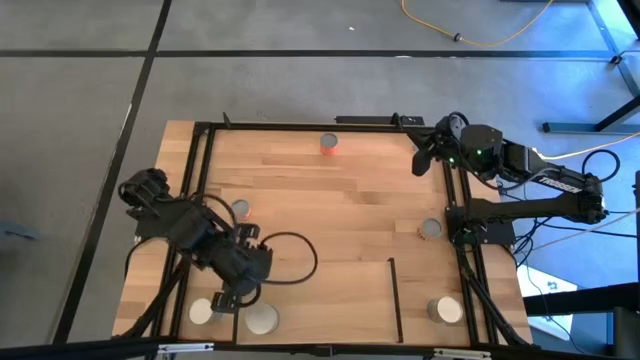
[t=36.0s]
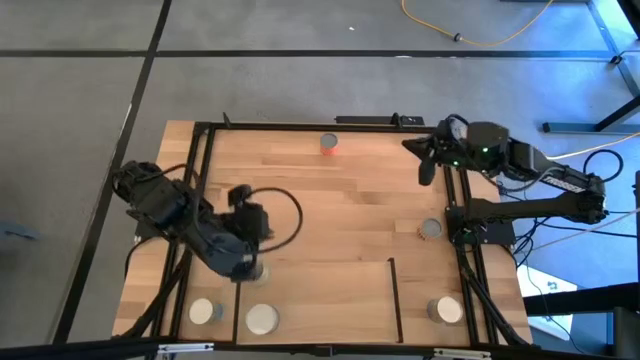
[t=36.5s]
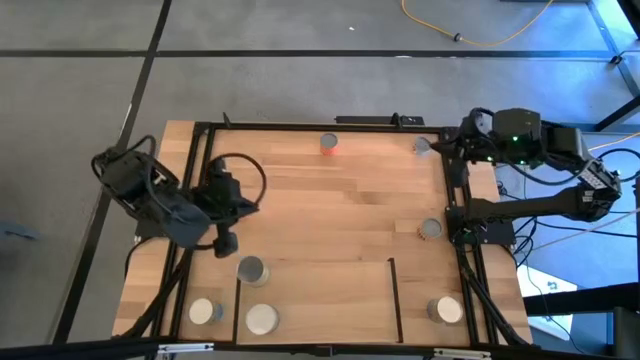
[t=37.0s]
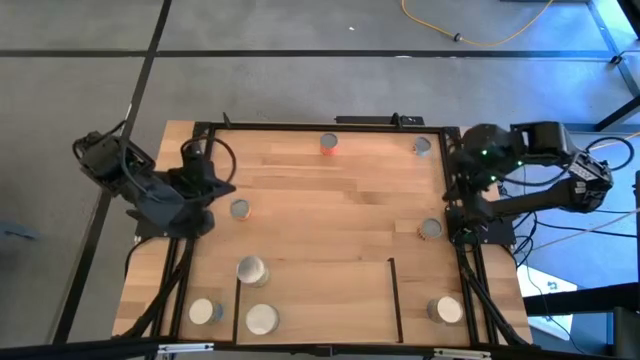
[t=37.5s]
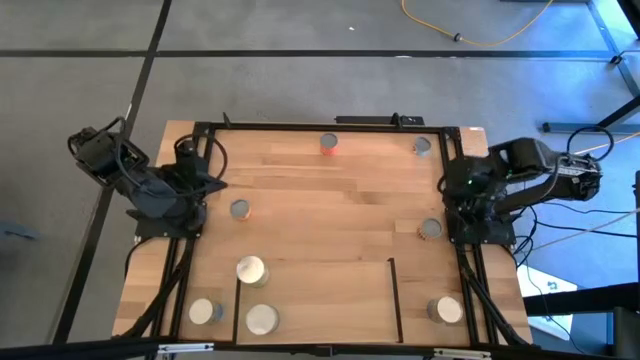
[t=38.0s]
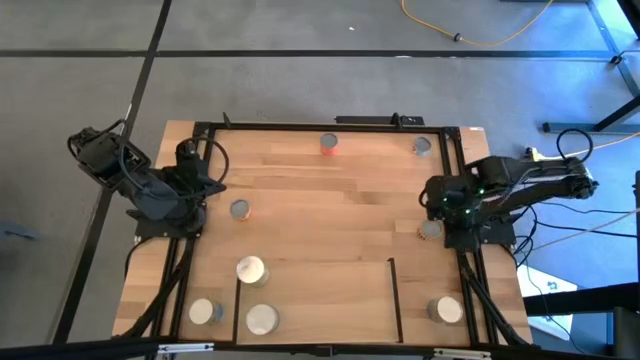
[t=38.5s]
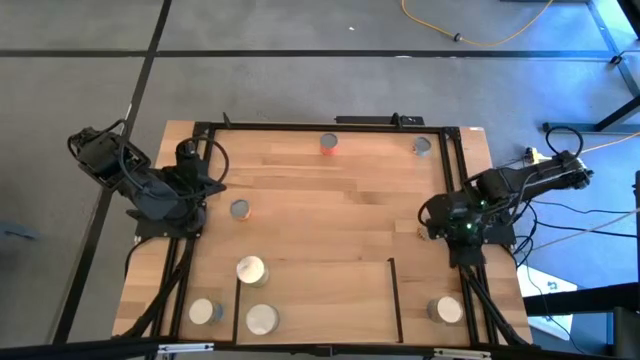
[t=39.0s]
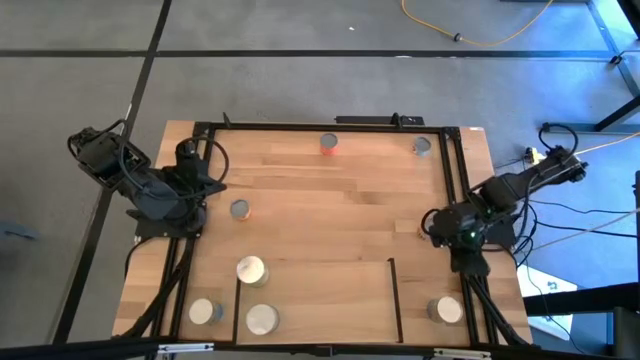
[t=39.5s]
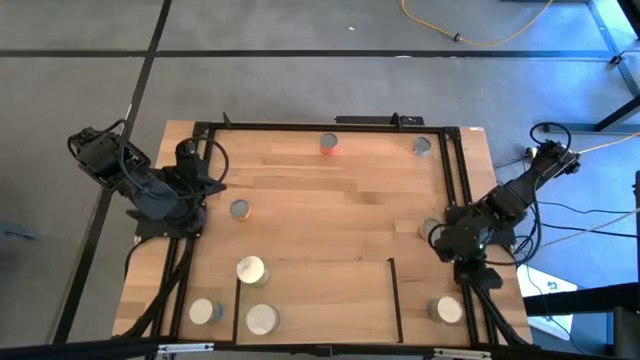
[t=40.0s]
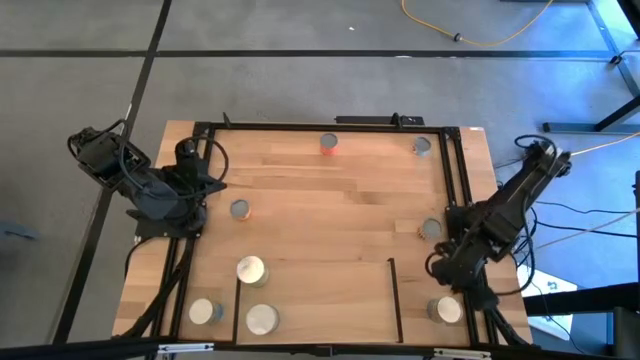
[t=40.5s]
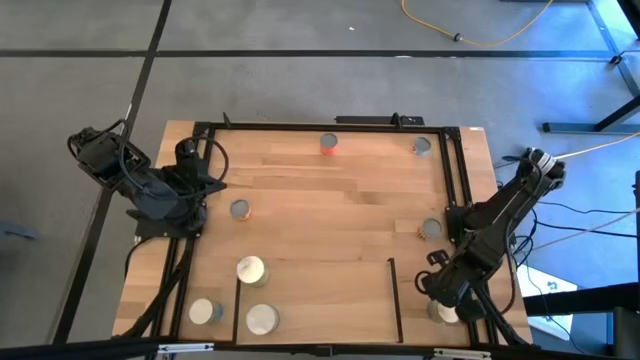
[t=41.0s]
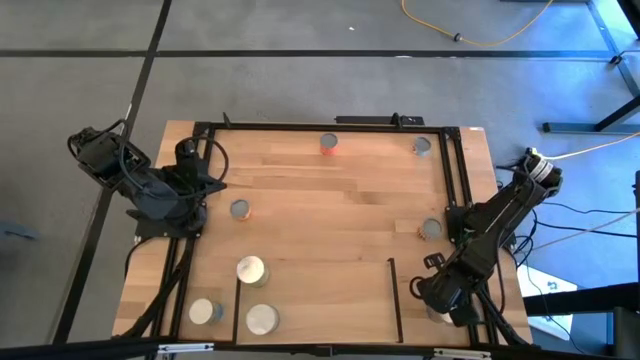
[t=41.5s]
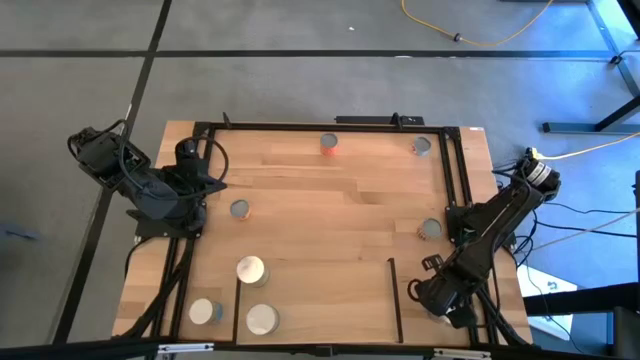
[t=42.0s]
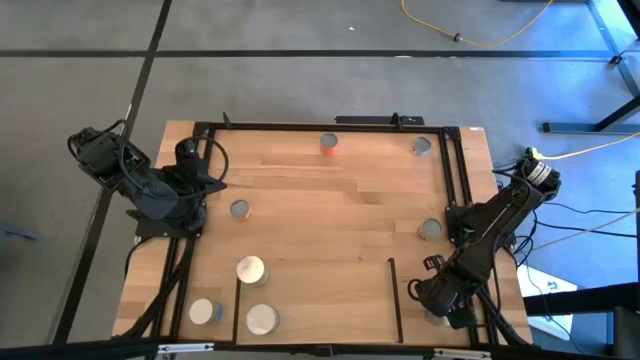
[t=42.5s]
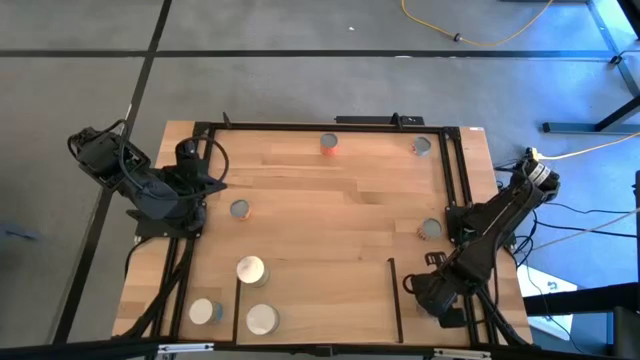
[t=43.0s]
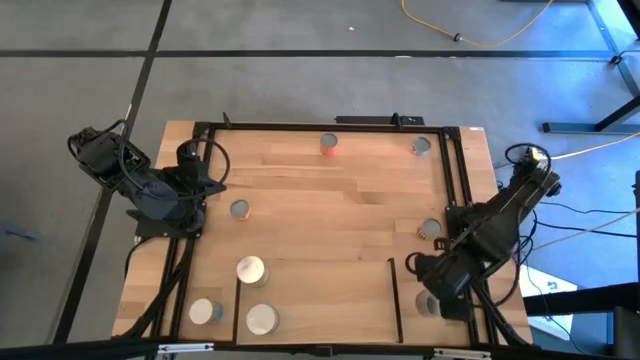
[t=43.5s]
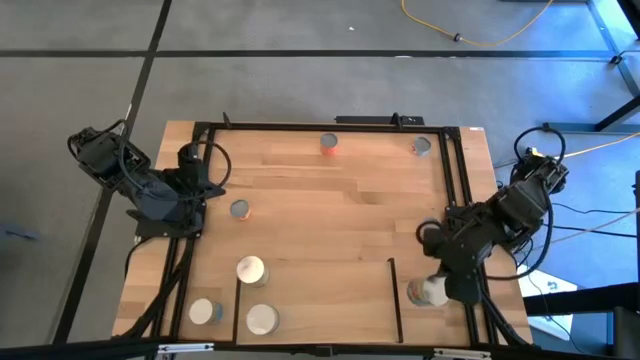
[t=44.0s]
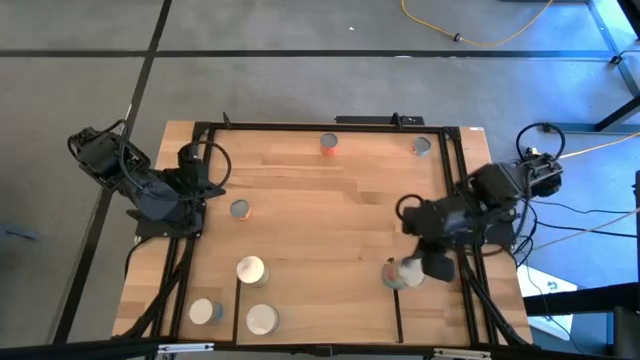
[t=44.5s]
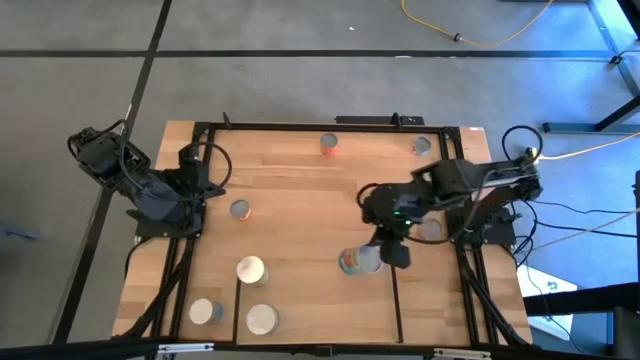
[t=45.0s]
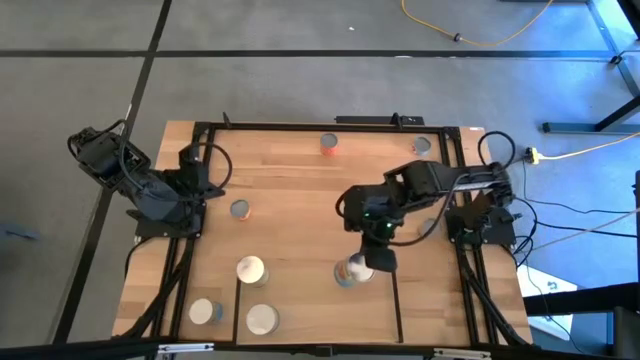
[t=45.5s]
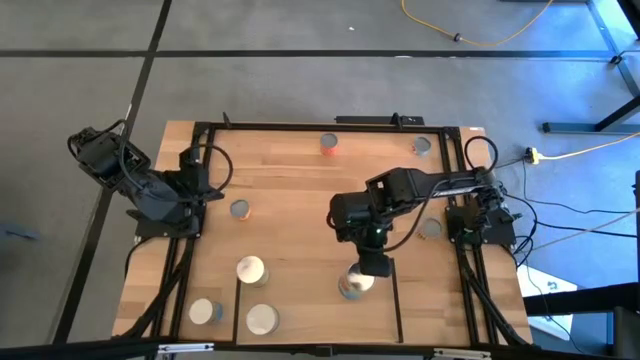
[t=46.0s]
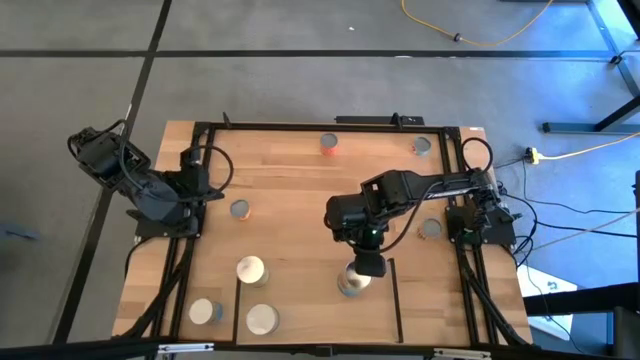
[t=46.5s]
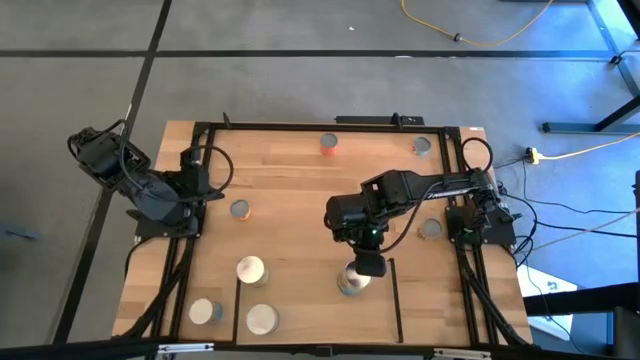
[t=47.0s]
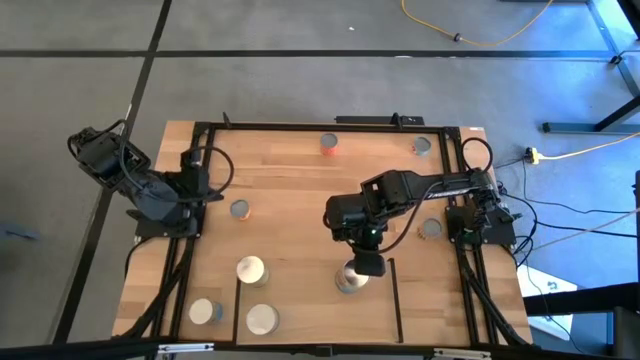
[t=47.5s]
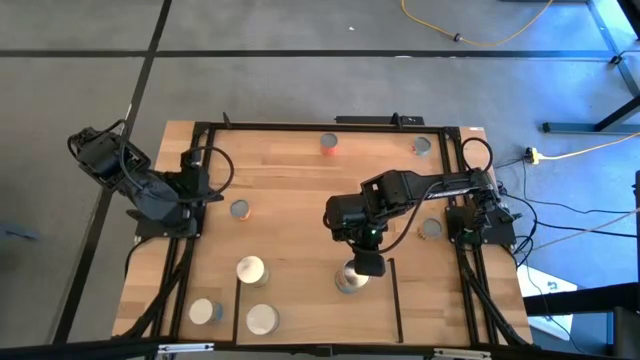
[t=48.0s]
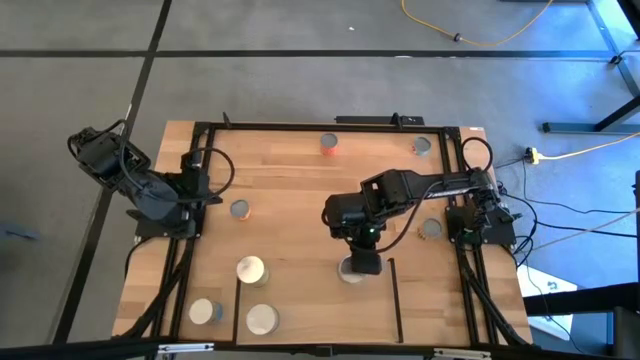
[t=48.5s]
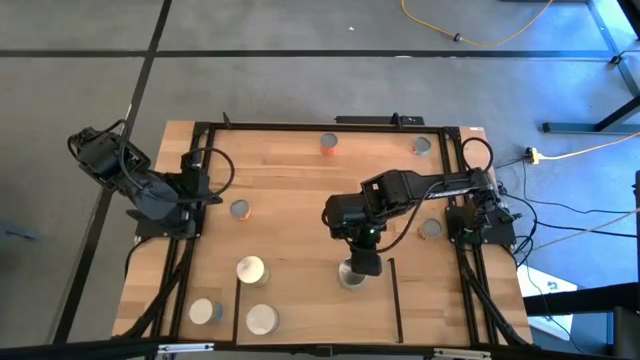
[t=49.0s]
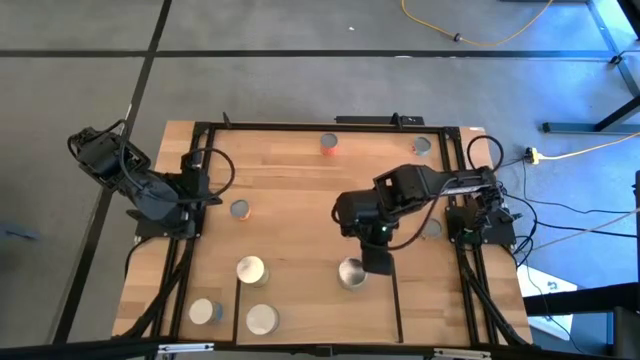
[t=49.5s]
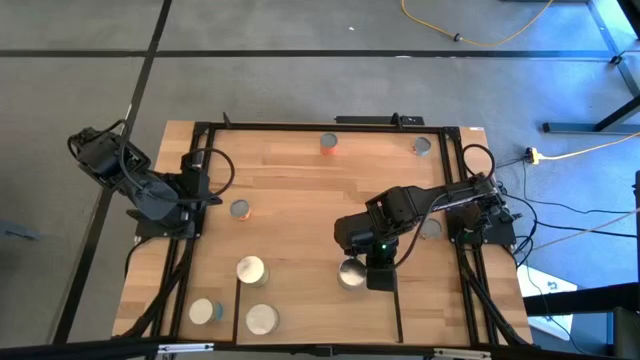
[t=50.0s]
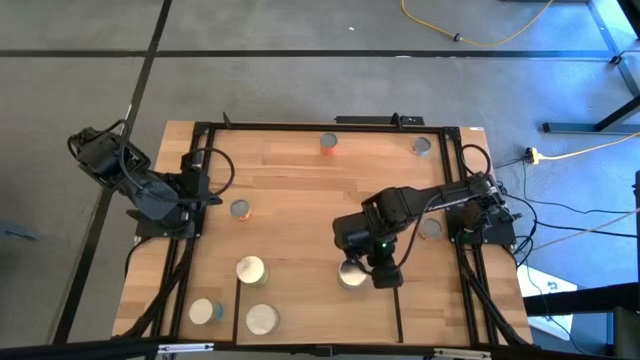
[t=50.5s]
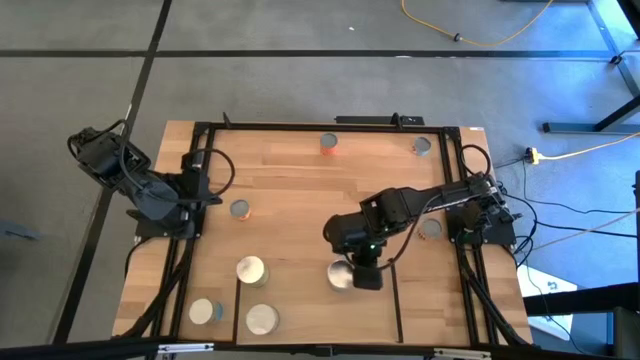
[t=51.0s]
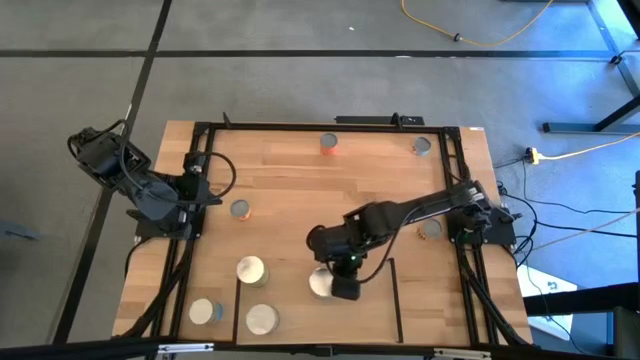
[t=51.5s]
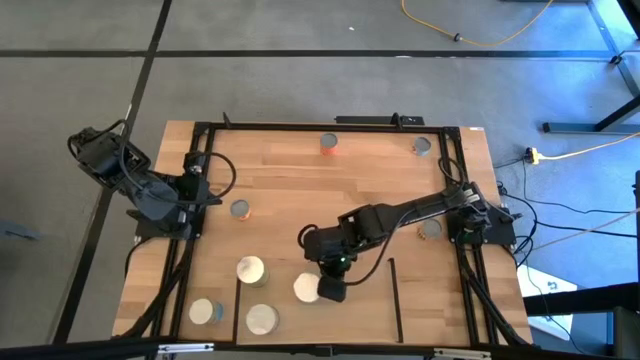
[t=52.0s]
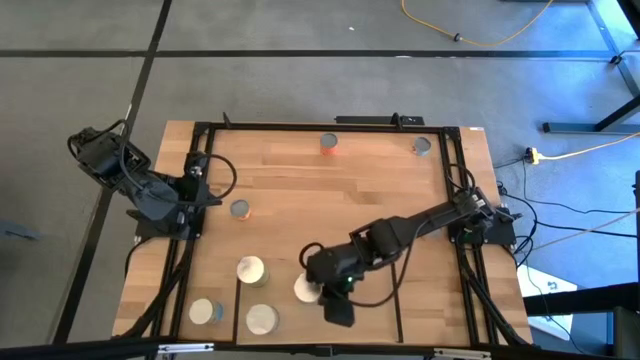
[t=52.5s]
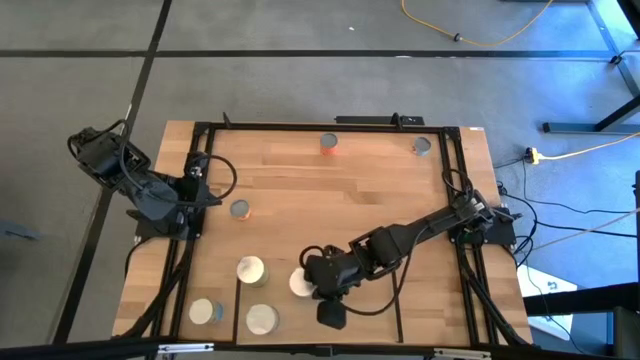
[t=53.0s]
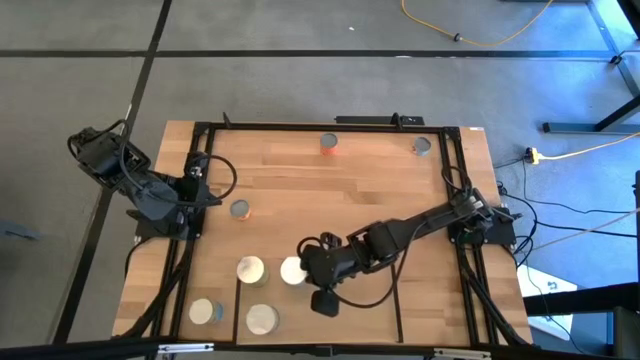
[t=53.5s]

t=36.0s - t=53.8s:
Task: Pick and place cans onto a shelf
Put the right canned tomatoes on the shelf

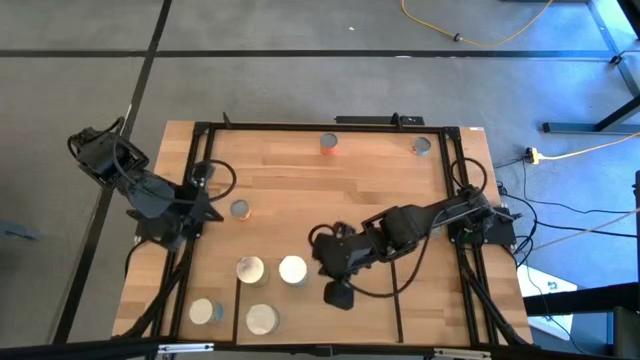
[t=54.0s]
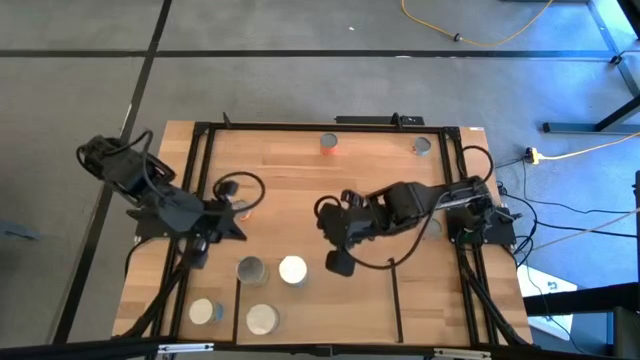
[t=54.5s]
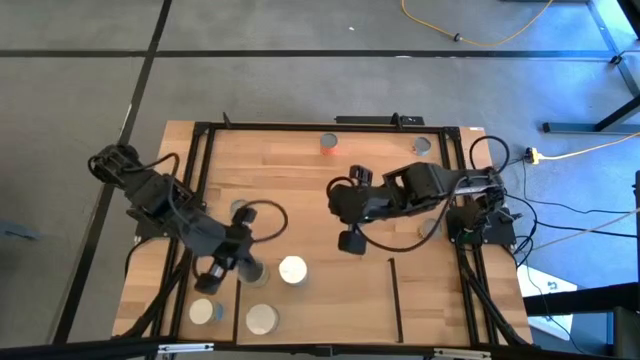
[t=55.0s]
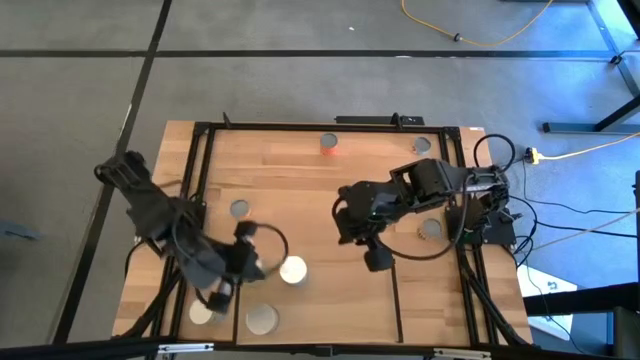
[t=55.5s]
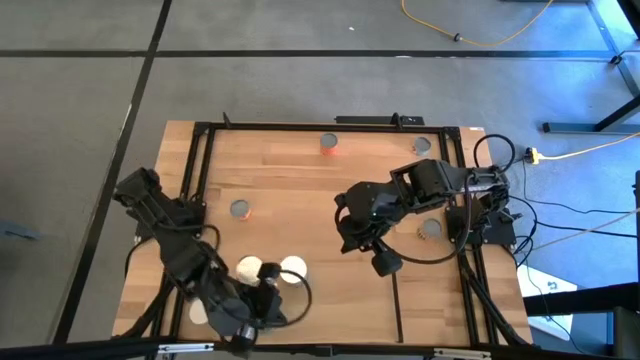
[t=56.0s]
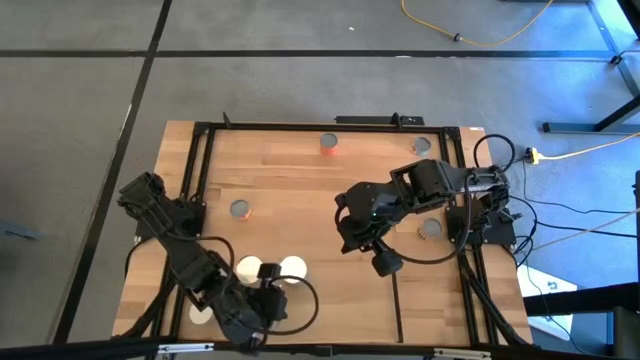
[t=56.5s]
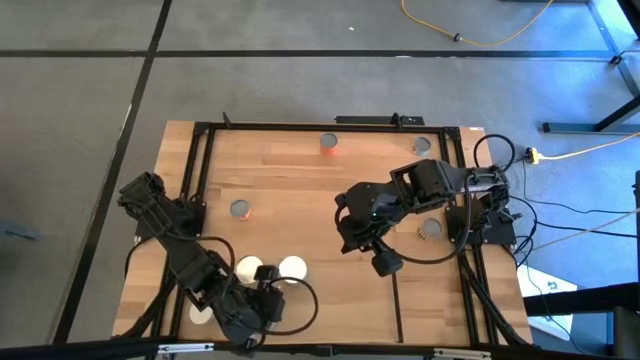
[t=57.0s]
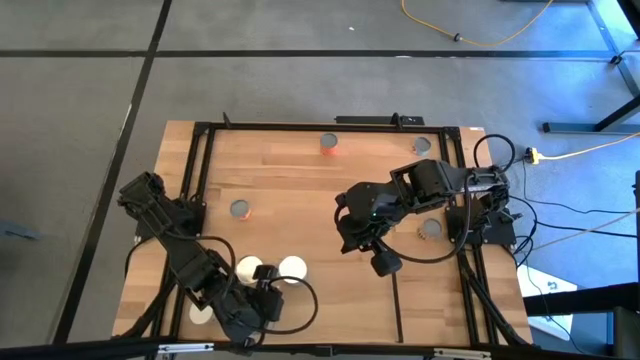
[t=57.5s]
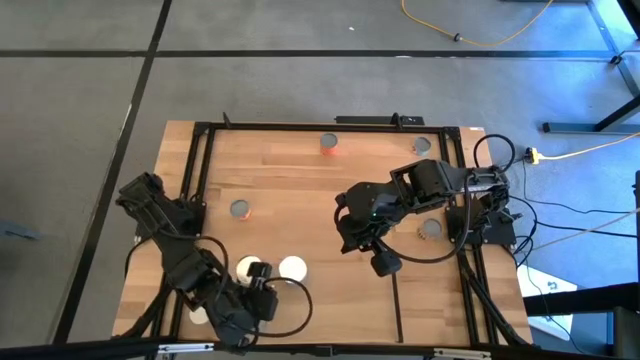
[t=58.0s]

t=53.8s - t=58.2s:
Adjust the canned peas on the shelf
